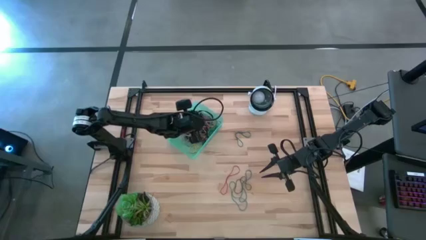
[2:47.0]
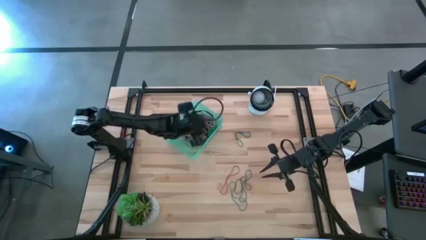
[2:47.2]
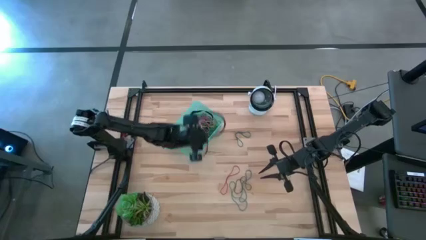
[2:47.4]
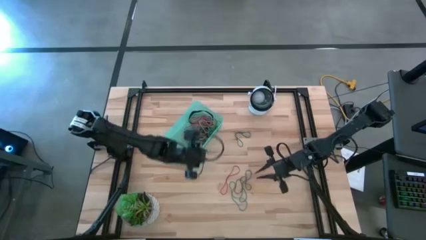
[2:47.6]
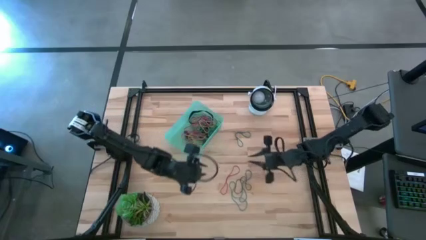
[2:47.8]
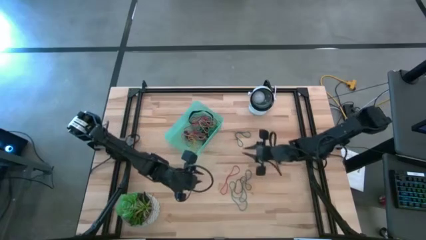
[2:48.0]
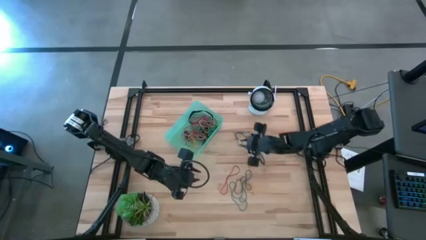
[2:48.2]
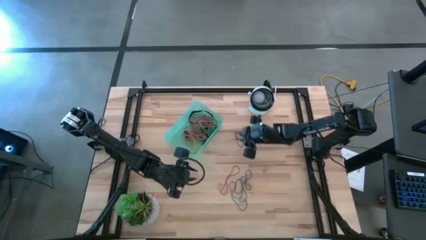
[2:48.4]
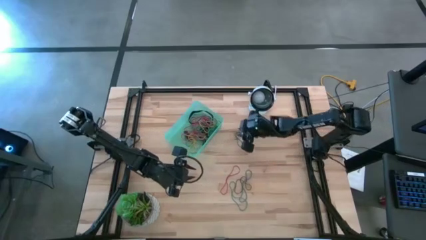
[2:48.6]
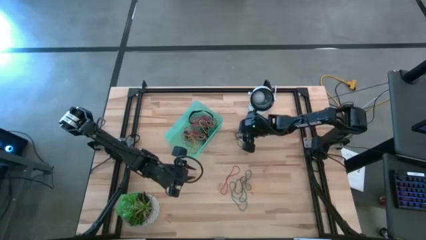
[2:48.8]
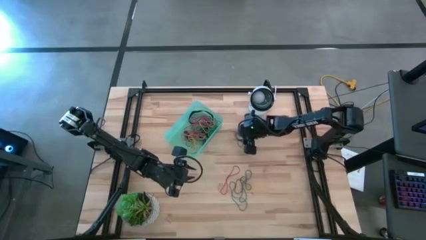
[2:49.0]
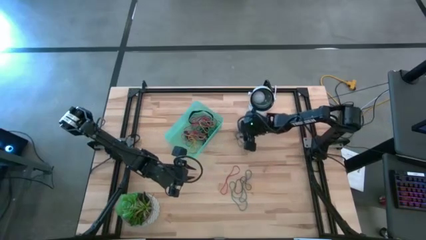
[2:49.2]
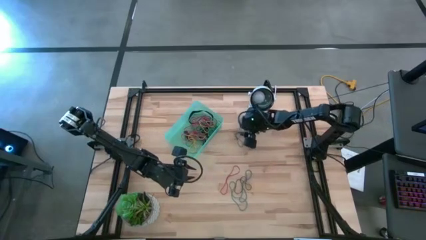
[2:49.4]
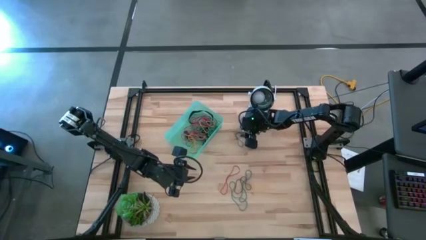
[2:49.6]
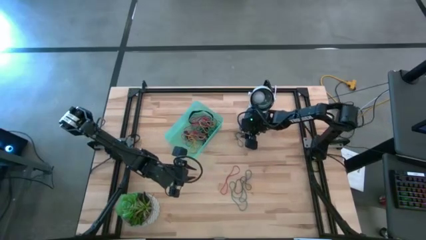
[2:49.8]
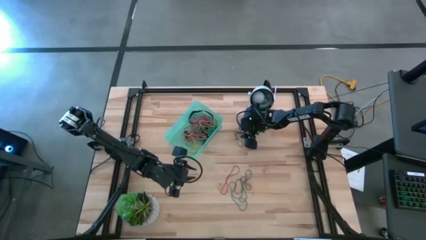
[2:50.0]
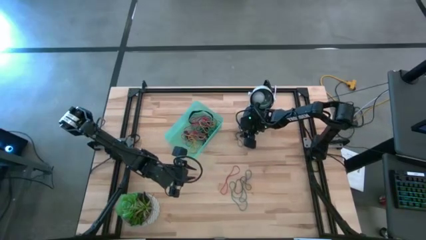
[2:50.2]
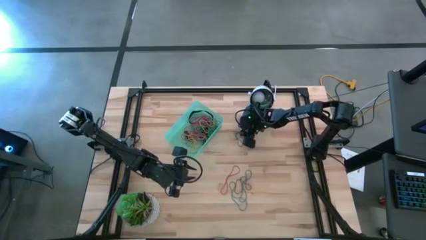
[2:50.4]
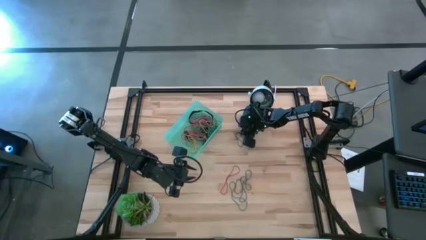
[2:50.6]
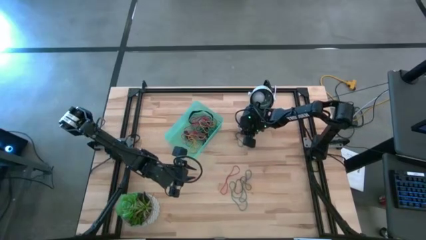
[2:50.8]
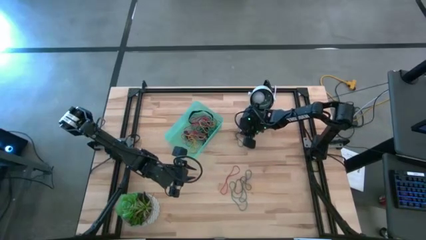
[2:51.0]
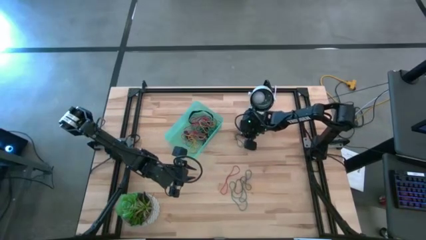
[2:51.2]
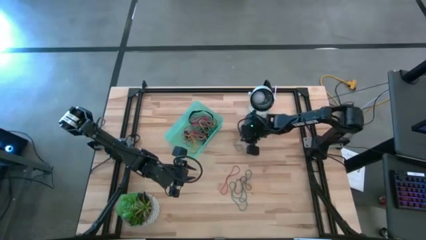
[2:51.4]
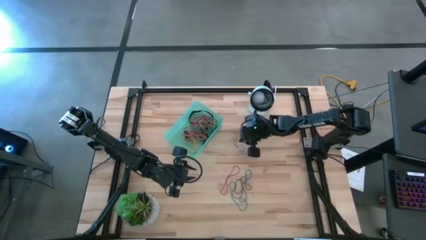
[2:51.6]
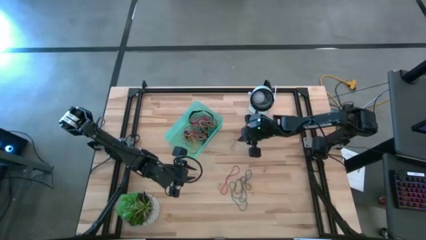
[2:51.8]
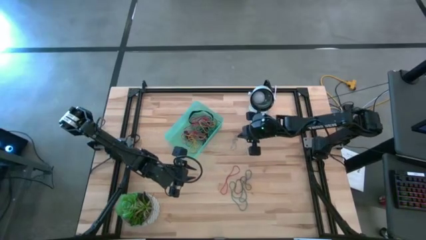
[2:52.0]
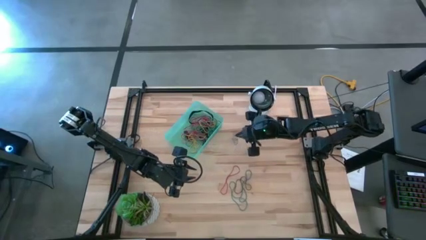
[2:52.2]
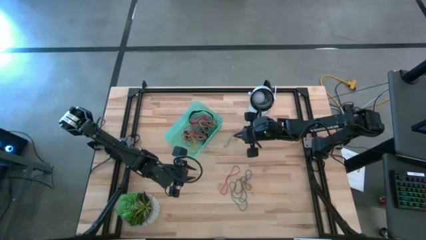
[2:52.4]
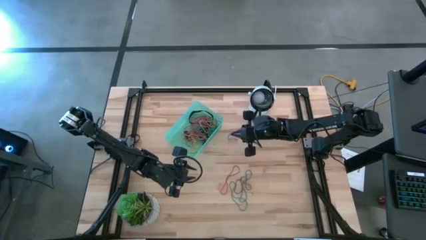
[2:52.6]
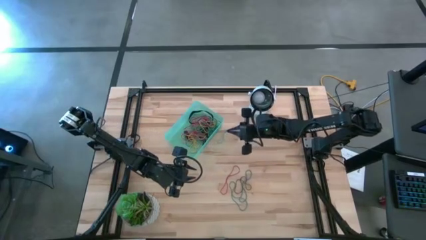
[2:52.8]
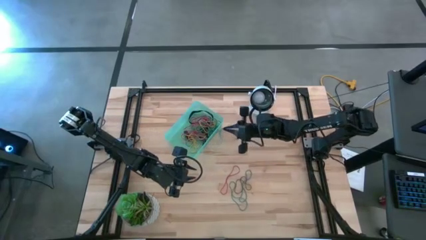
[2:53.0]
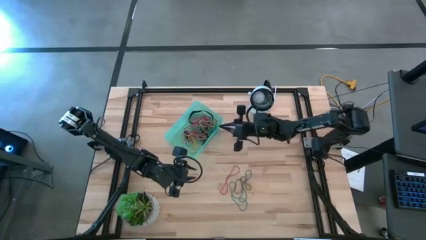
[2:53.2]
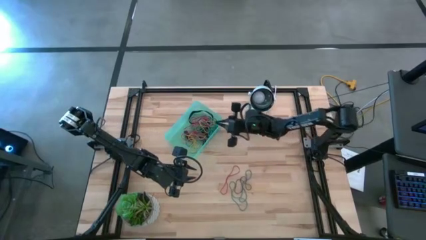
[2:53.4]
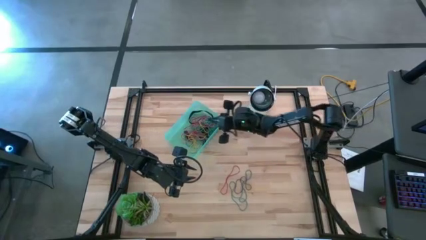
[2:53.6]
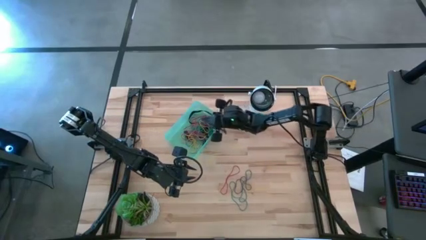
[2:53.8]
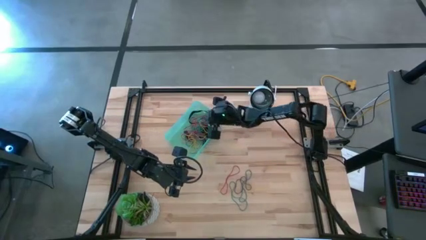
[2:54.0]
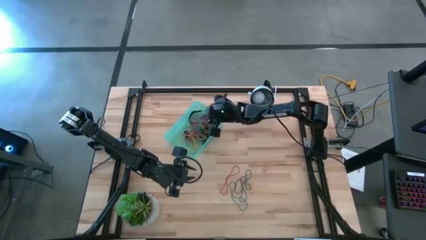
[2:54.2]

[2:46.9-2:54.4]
Task: Pick and place rubber bands into bin
Put the blue rubber band into the green bin

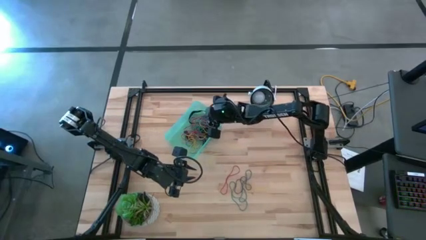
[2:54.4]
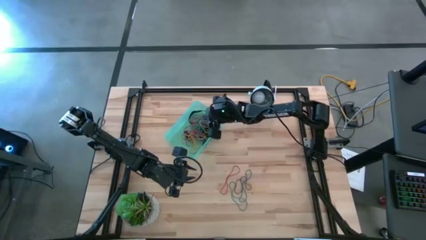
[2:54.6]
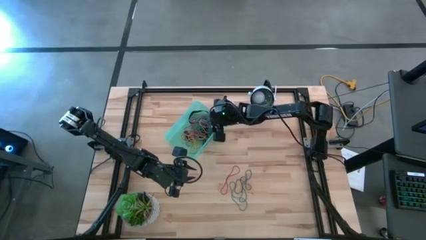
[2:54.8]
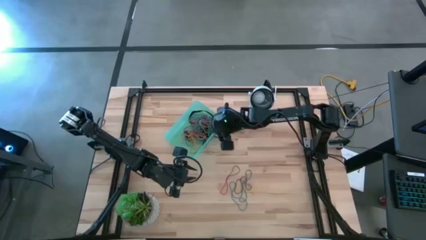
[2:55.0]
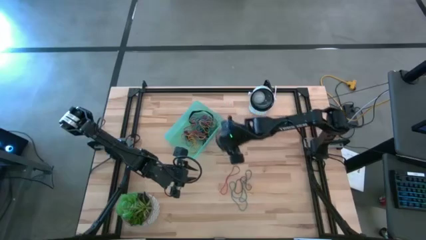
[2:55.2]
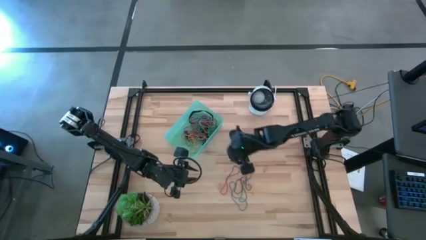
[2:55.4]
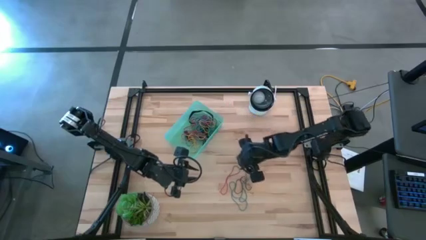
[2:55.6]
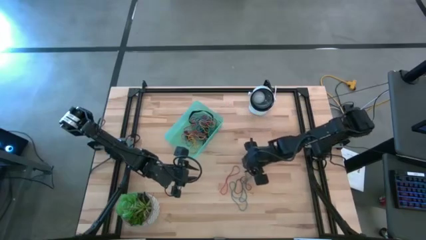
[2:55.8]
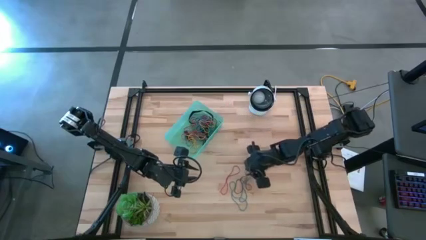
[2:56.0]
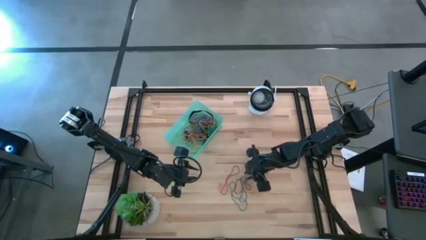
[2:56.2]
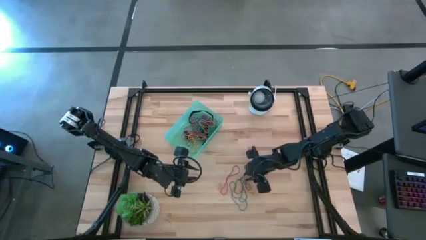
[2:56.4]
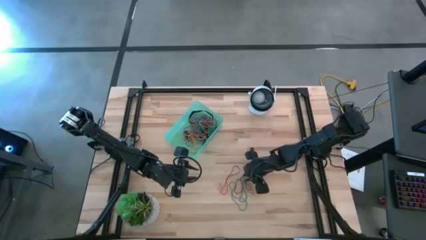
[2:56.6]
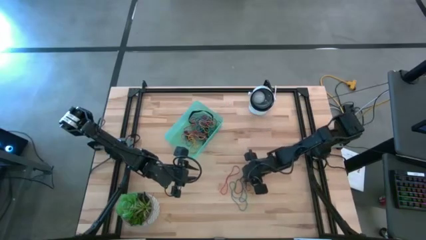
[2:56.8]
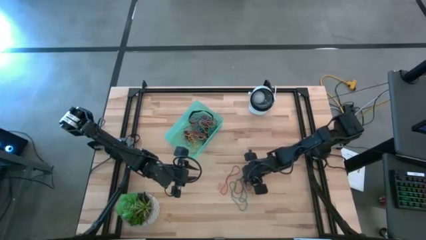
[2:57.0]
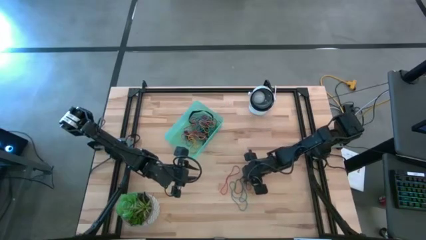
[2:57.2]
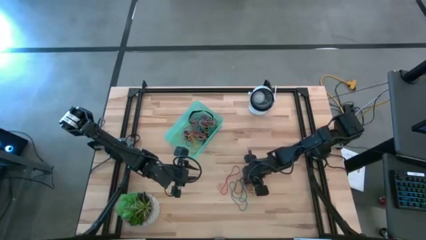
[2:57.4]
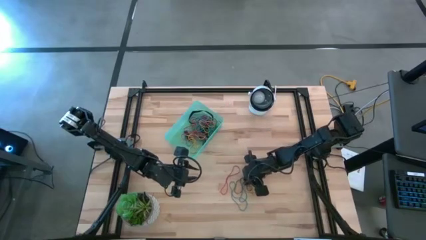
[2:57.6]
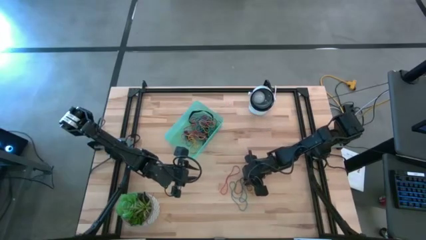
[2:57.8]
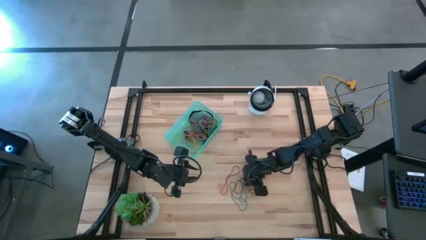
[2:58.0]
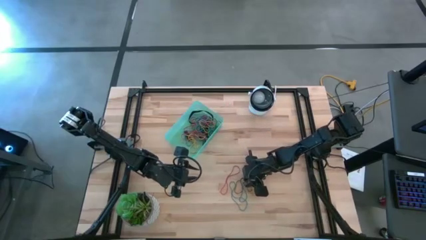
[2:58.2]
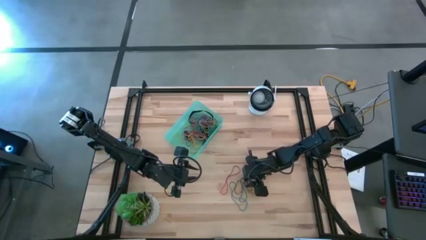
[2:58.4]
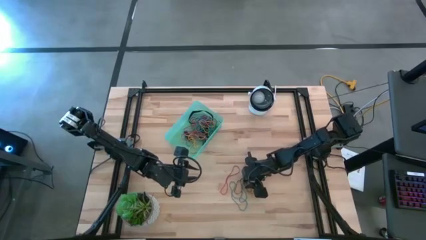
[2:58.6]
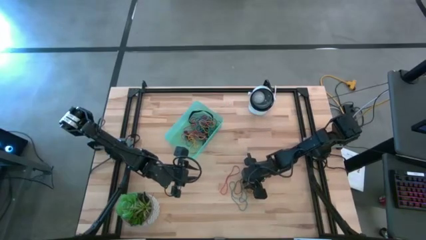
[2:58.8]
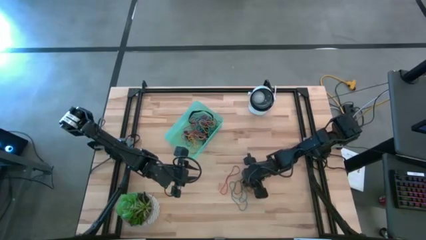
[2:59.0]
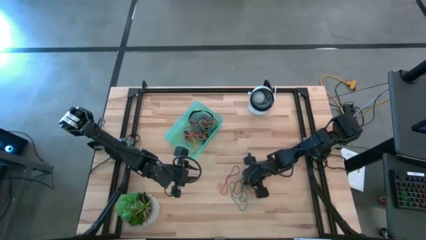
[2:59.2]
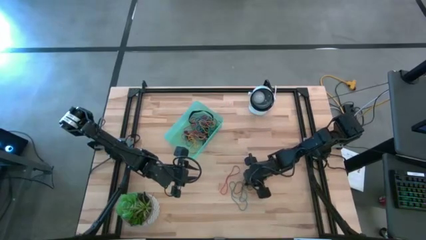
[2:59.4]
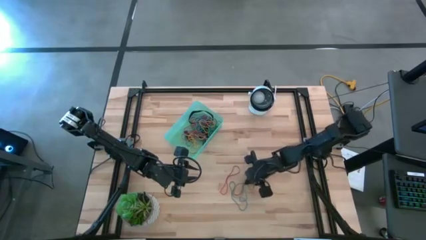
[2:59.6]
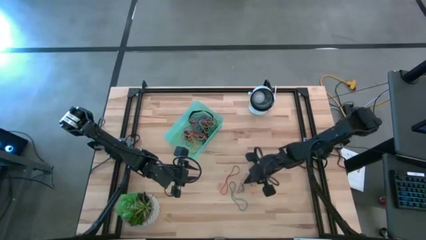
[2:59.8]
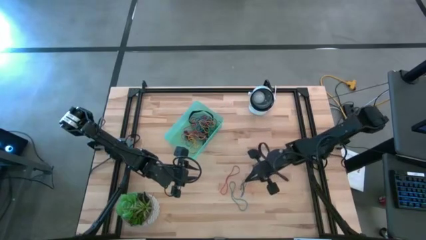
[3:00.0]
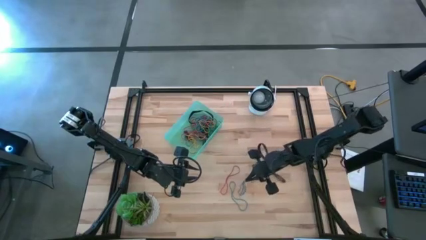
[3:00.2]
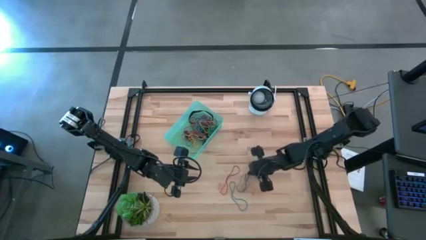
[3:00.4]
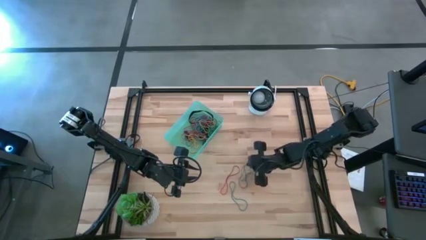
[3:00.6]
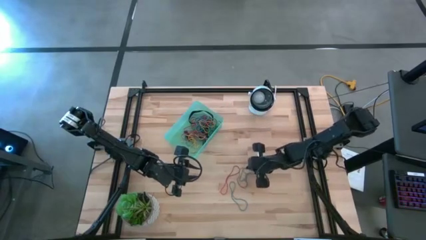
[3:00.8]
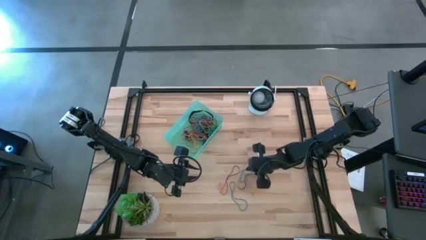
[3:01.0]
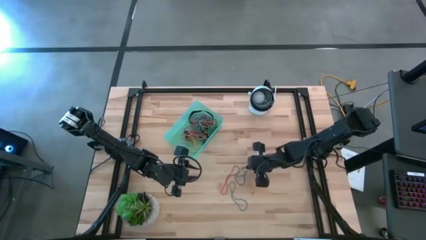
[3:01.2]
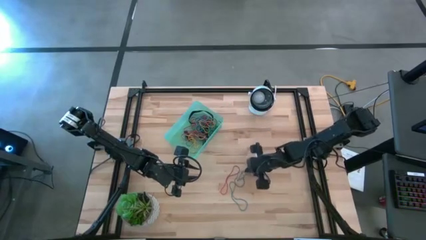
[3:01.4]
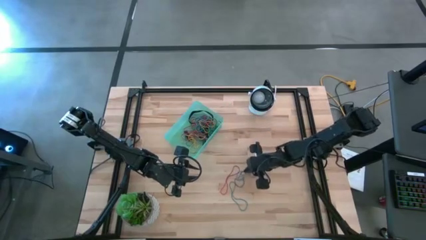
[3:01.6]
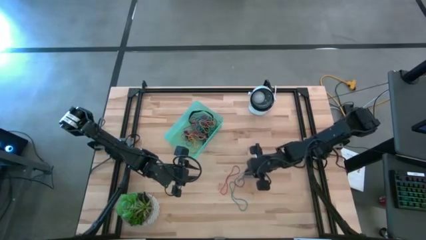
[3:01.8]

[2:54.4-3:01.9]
Put the blue rubber band into the green bin
